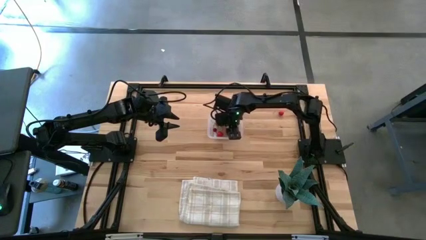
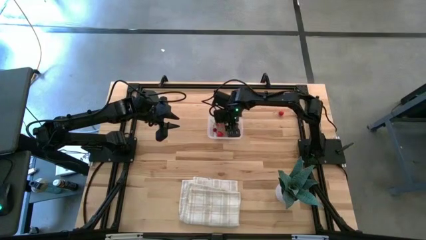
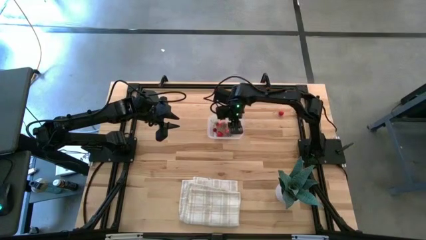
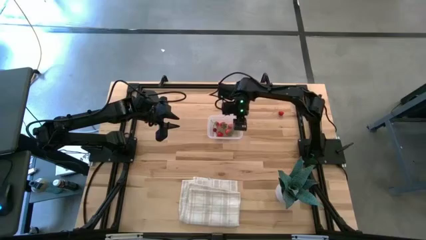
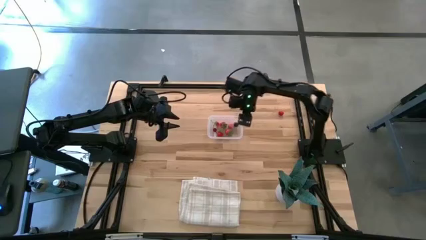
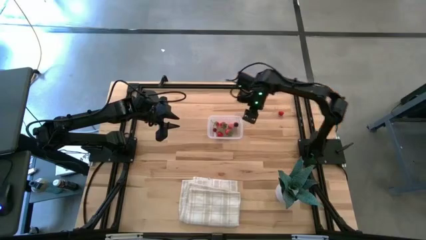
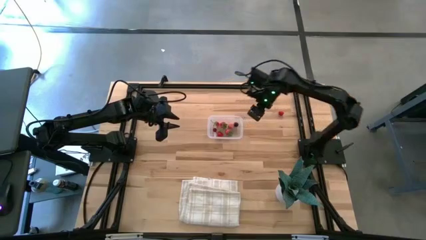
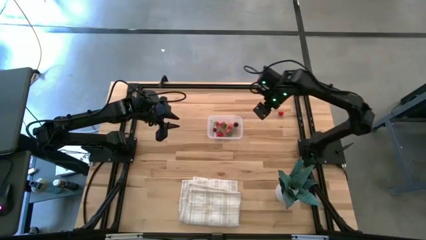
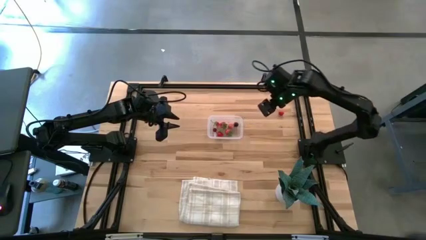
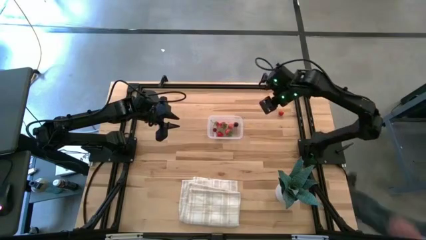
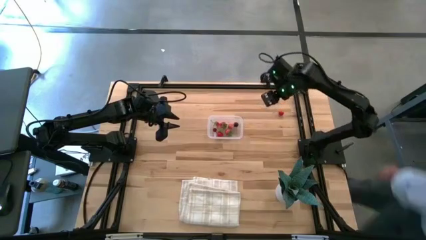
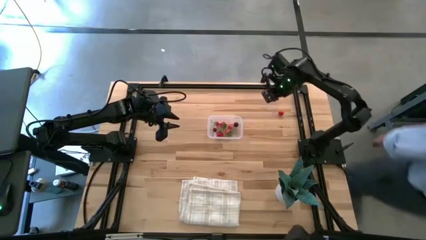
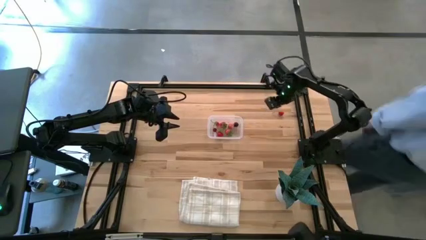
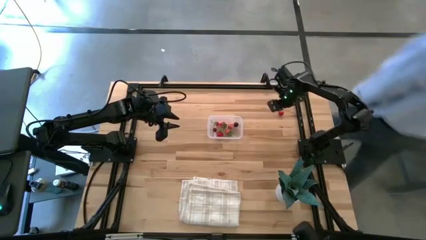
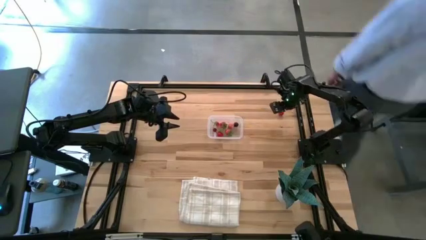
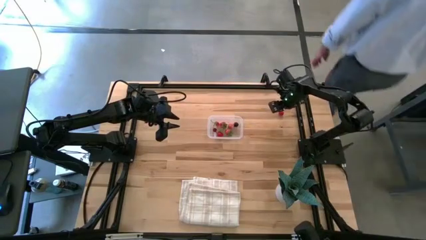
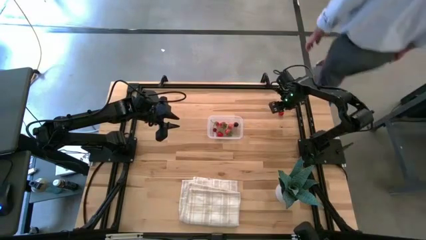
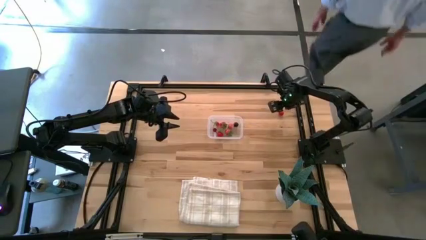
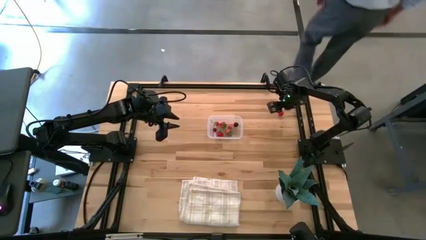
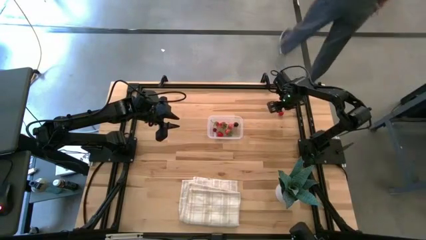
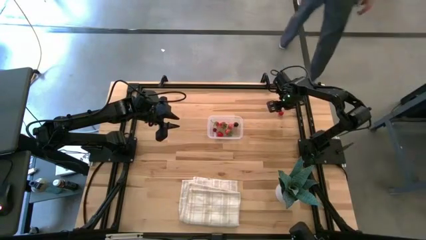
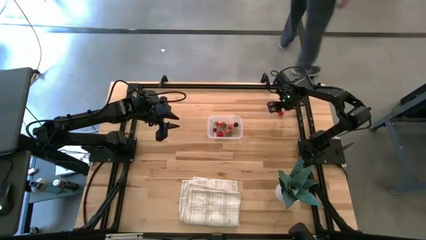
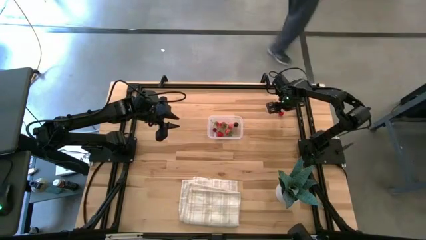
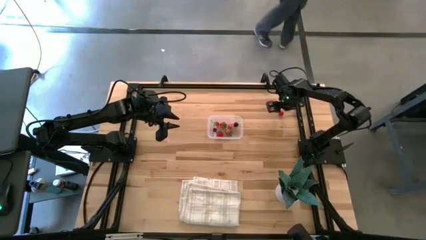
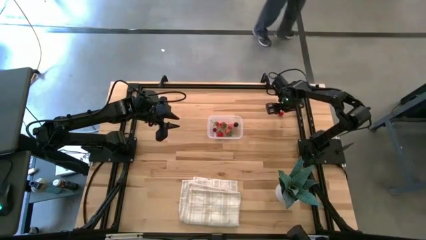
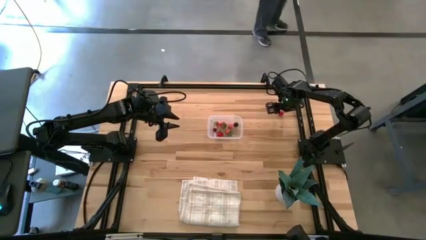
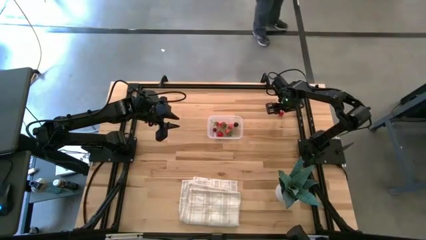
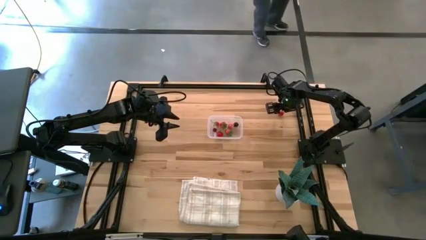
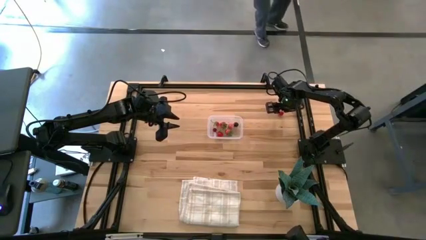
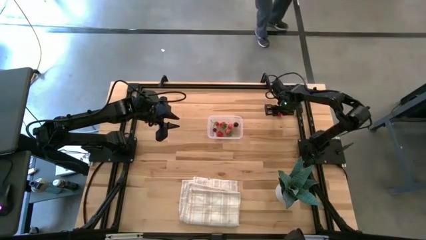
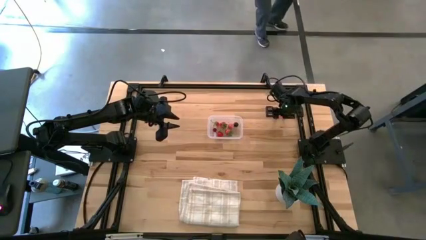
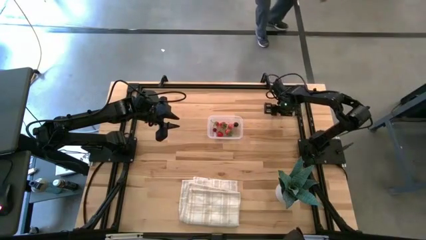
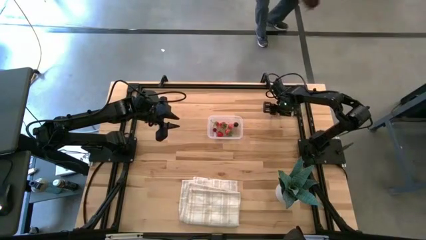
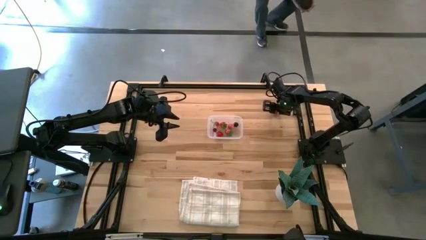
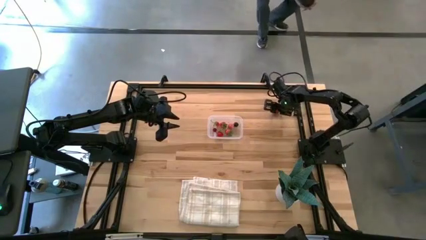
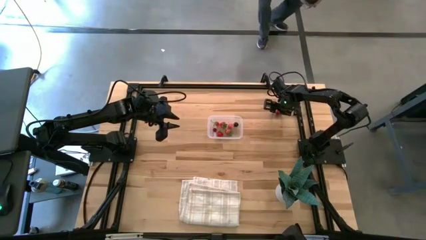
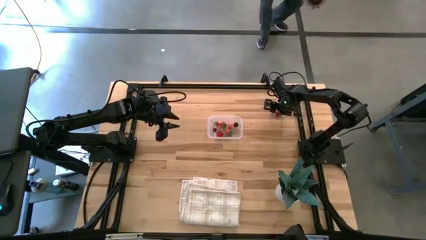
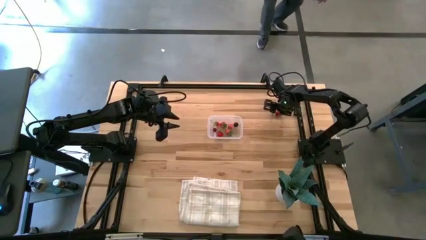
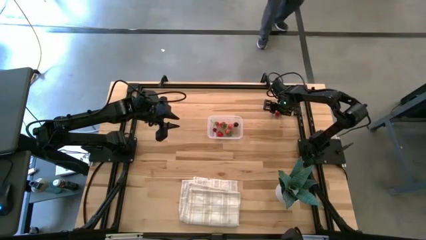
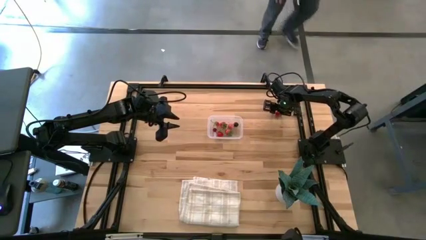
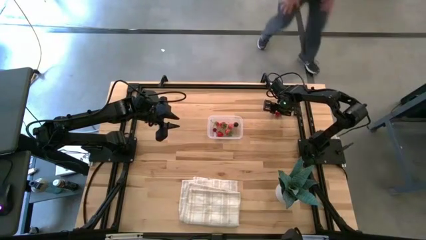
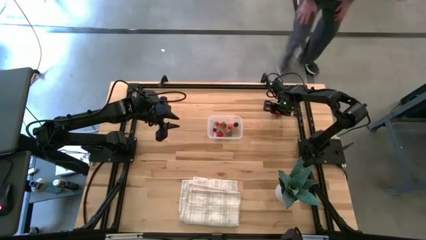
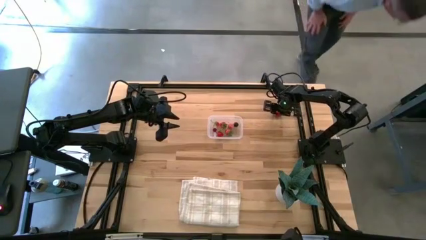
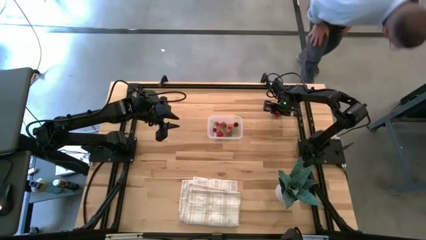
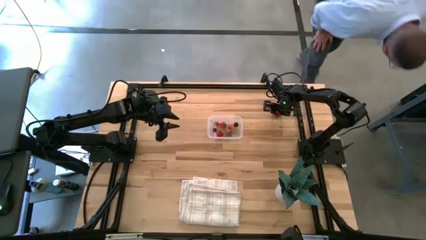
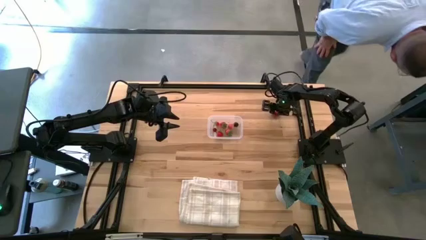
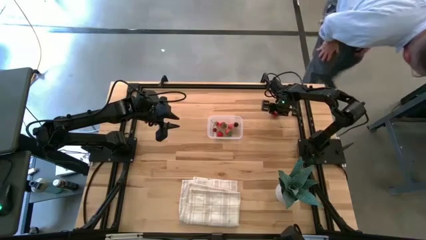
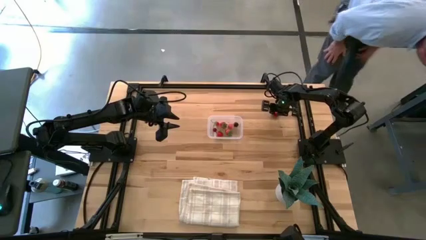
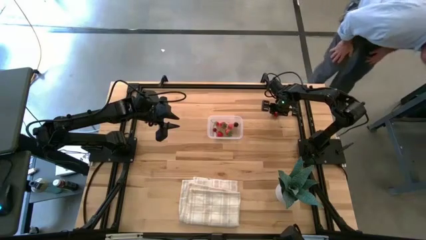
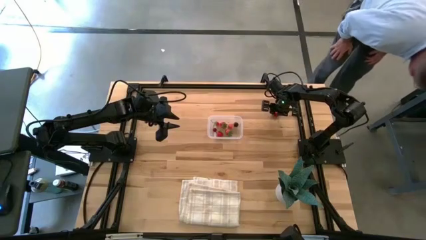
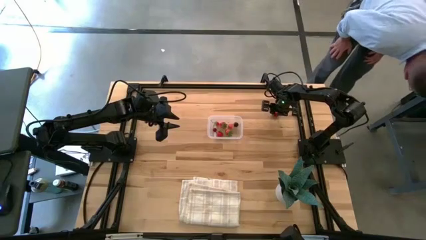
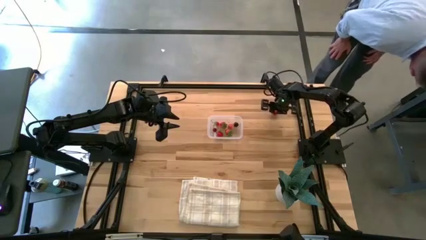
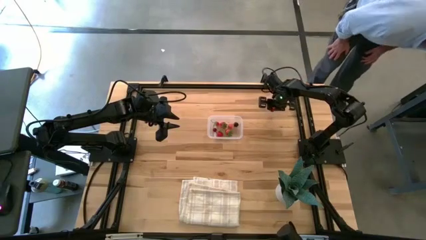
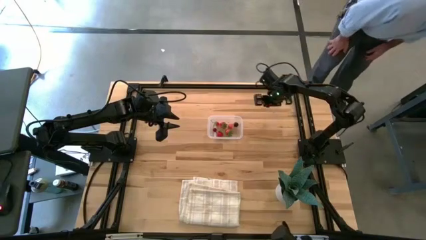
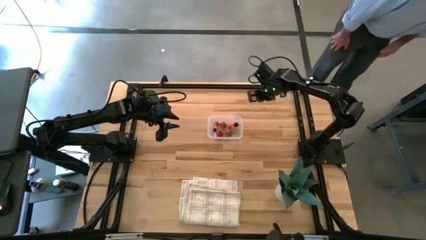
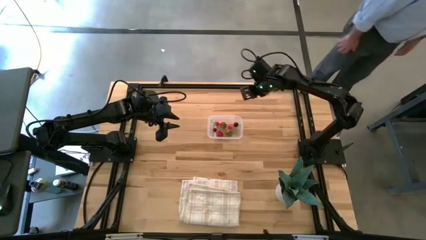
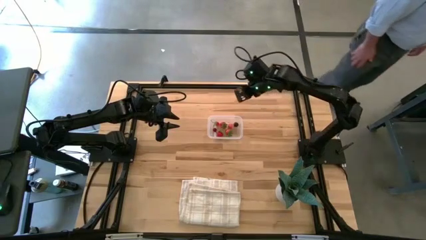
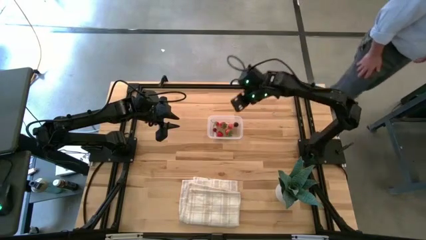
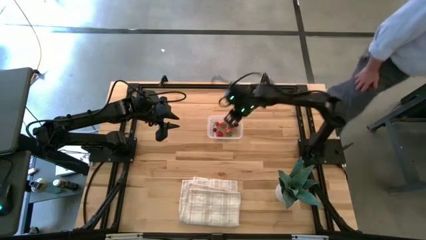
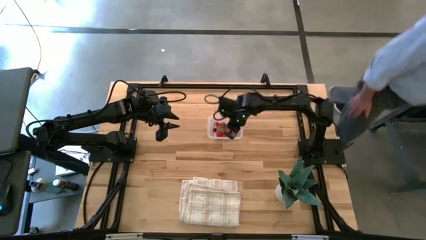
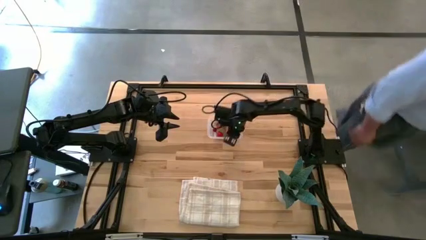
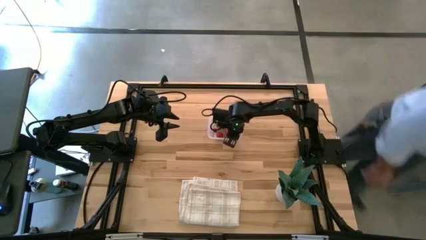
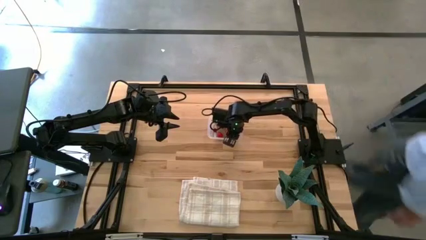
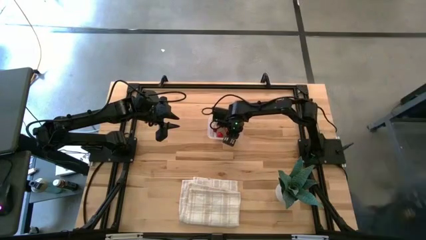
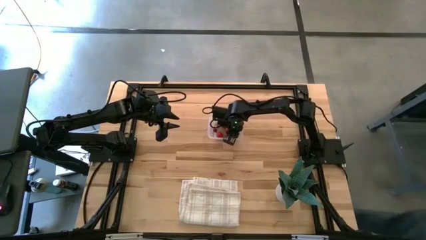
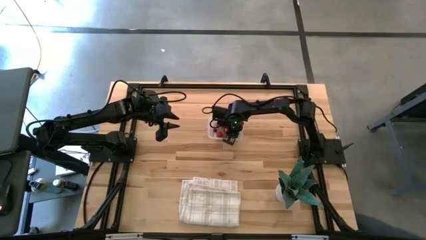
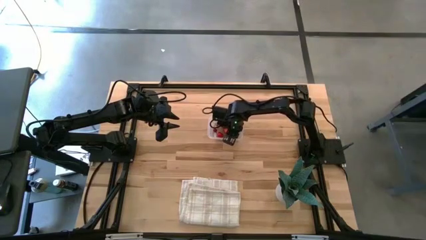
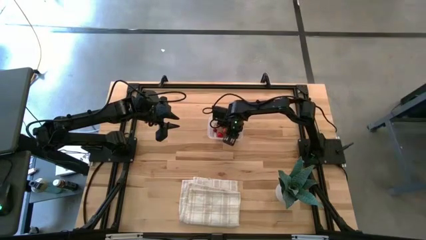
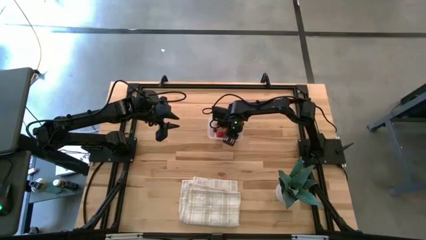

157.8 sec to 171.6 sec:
Task: Pick and placing Produce into tupperware
Put the raspberry into the transparent bin
